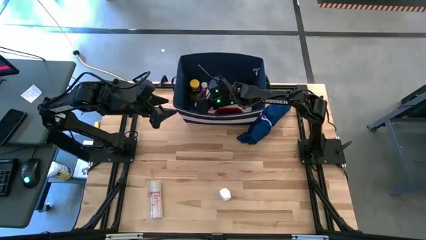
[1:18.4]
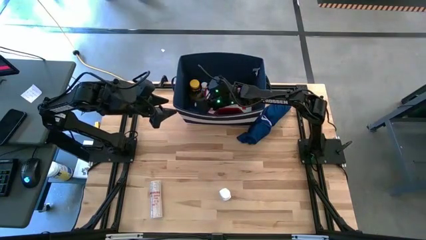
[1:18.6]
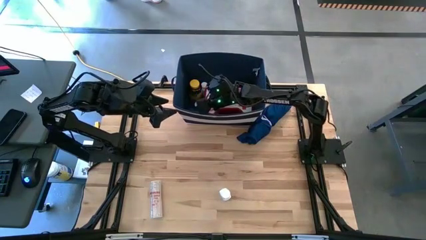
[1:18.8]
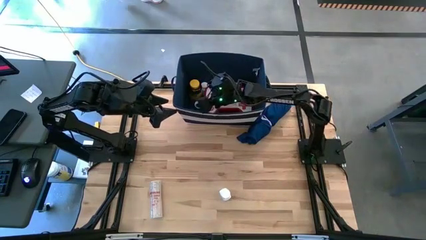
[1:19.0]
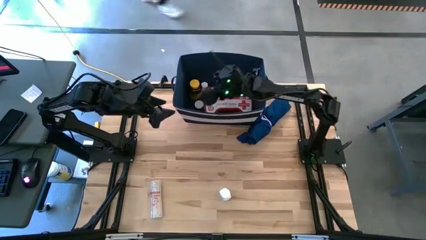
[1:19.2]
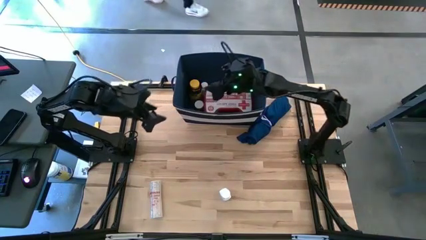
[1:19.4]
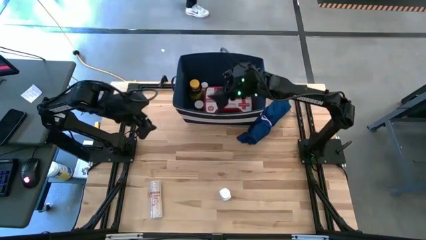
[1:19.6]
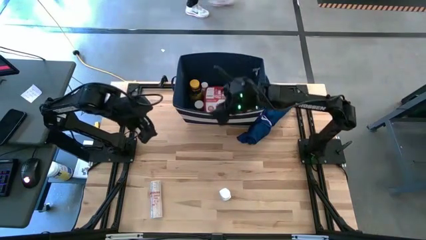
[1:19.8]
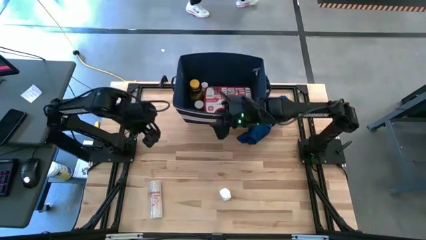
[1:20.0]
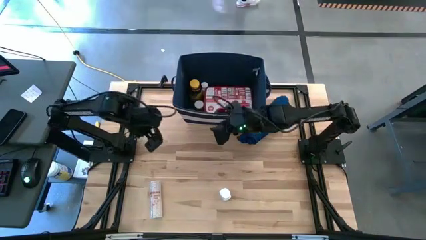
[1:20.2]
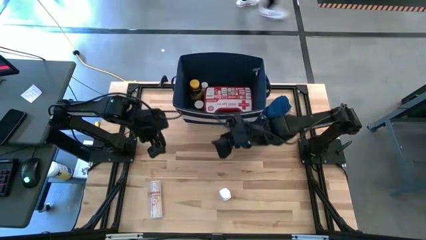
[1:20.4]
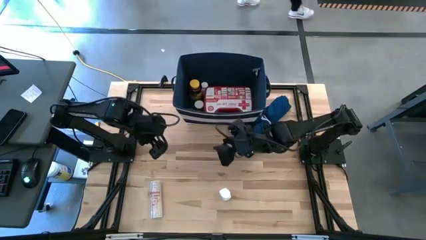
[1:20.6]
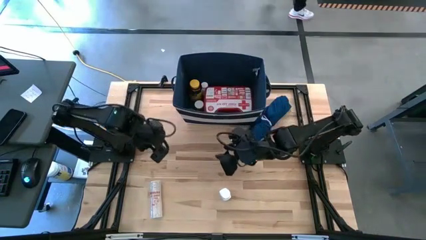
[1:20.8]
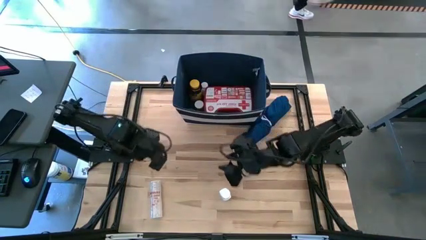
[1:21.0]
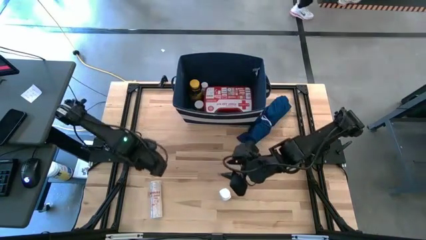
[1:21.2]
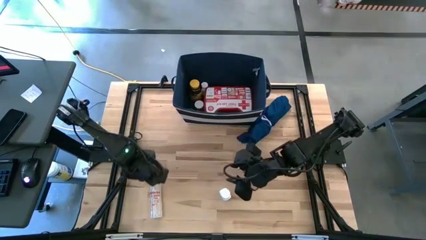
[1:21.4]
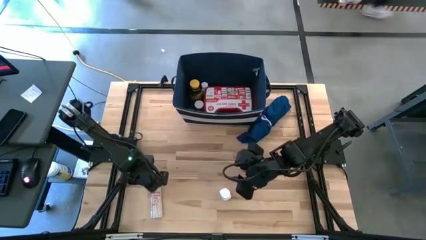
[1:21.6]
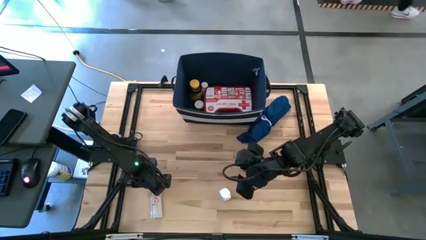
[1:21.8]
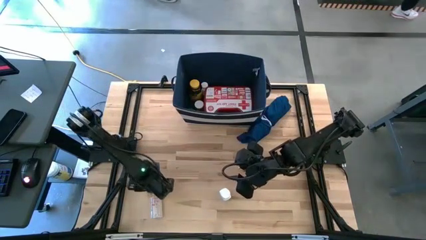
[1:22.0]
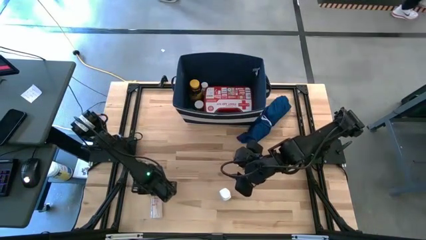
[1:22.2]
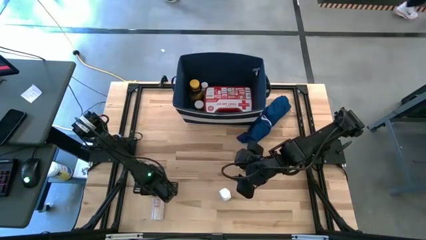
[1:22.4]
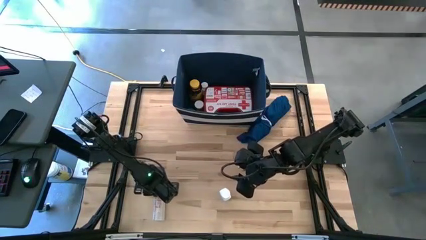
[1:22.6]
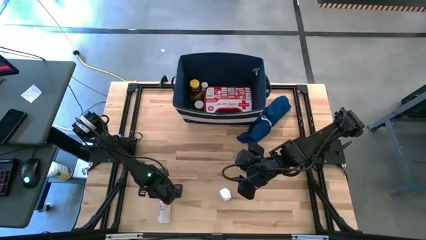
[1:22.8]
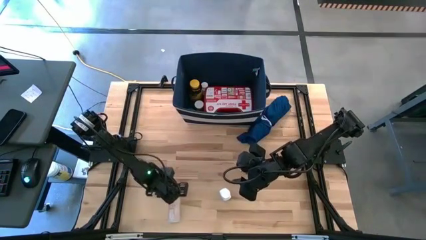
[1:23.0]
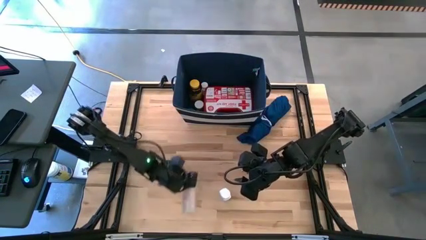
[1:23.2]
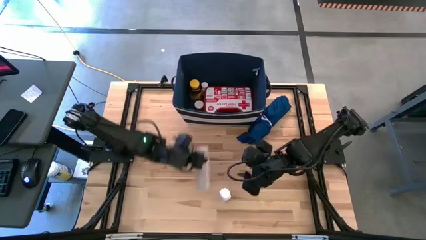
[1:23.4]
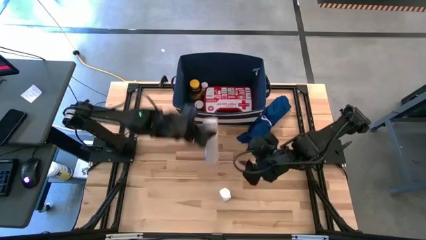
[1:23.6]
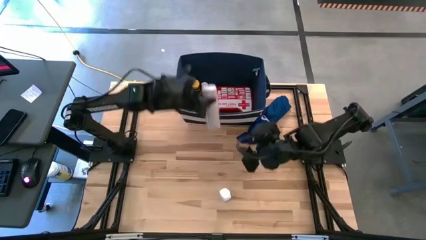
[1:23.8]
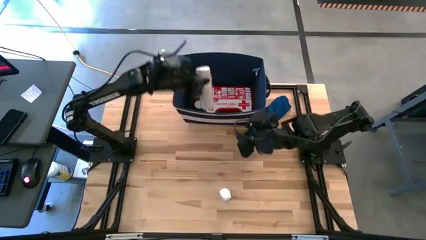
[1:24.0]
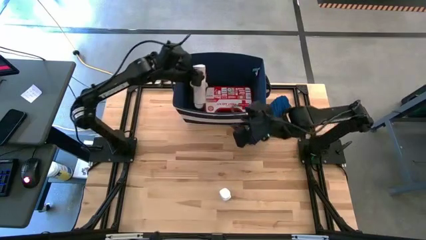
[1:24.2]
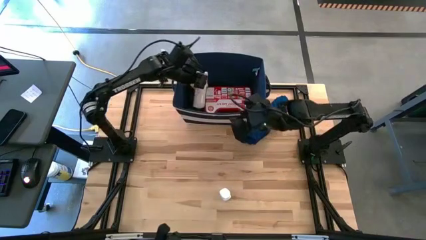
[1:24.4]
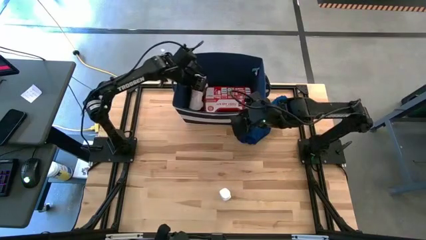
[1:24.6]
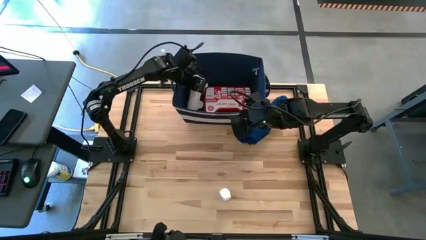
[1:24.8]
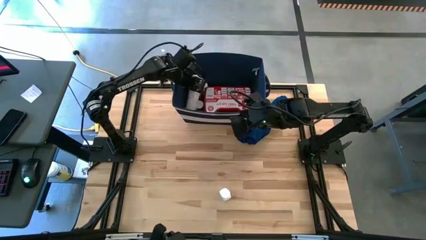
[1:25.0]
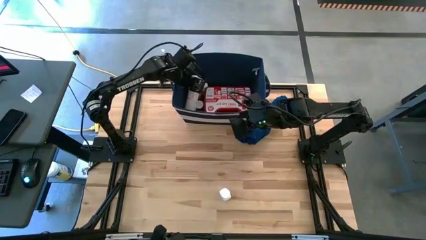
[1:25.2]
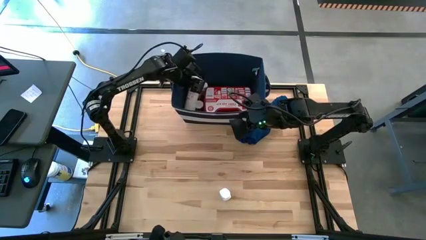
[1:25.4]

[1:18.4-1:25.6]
Task: Pick & place medical supplies in basket/bin
Put the rolled white bandage into the blue bin

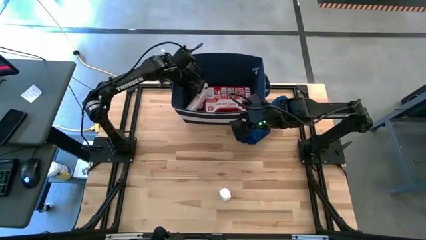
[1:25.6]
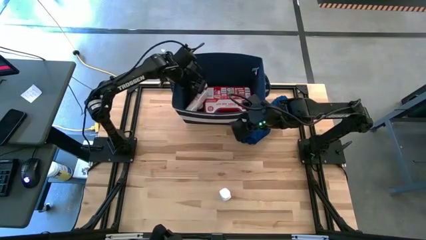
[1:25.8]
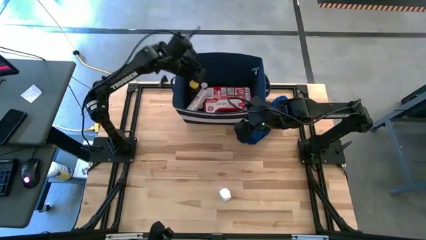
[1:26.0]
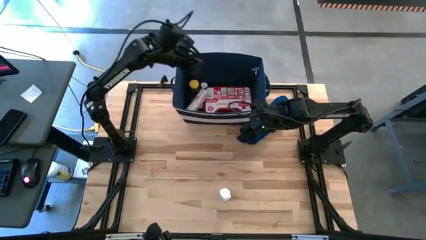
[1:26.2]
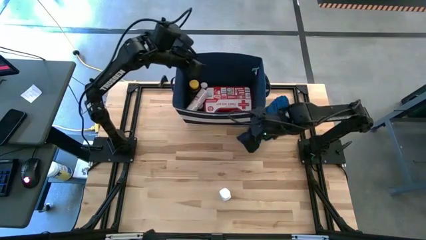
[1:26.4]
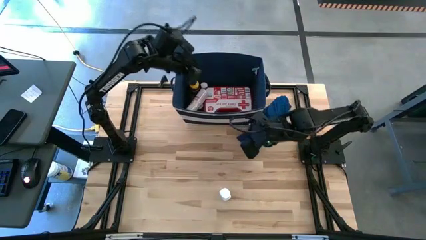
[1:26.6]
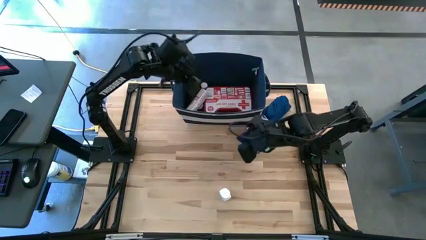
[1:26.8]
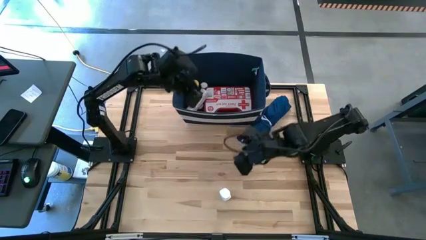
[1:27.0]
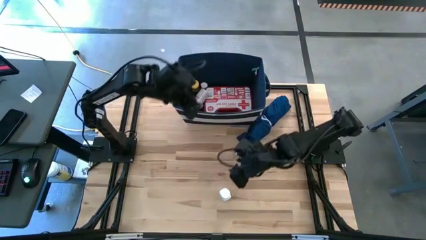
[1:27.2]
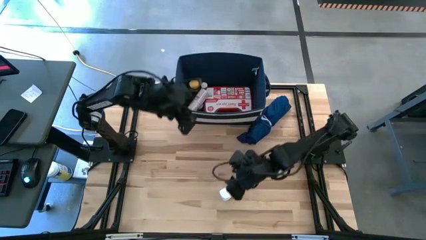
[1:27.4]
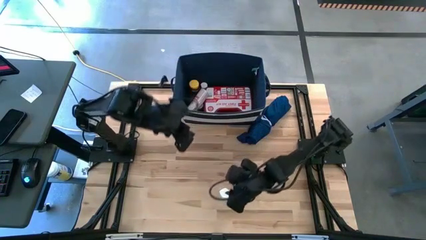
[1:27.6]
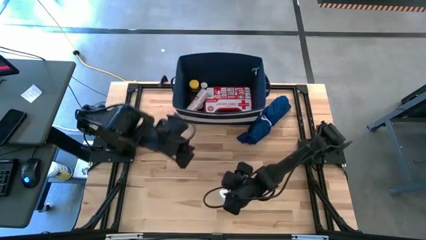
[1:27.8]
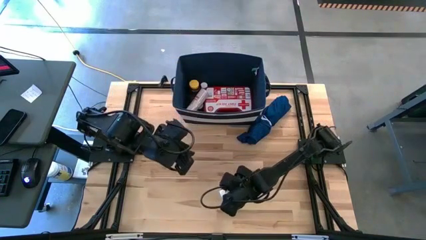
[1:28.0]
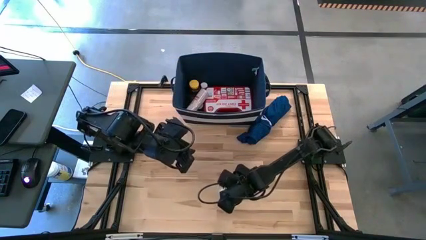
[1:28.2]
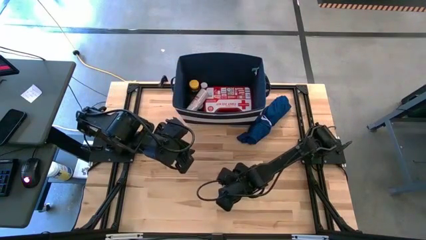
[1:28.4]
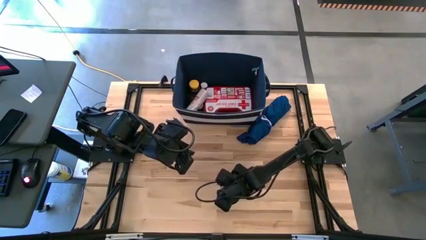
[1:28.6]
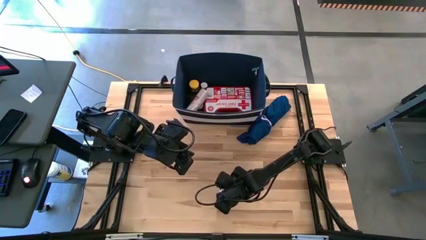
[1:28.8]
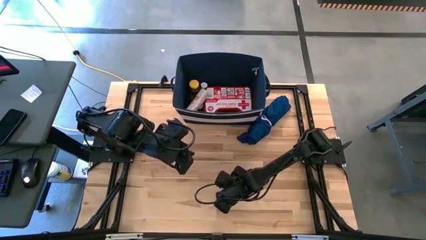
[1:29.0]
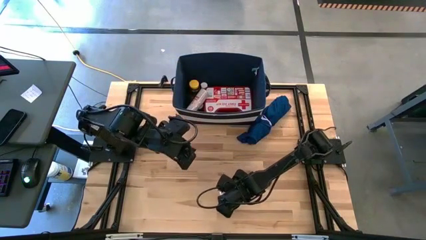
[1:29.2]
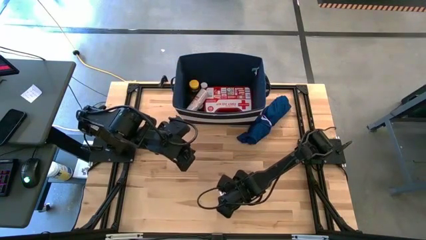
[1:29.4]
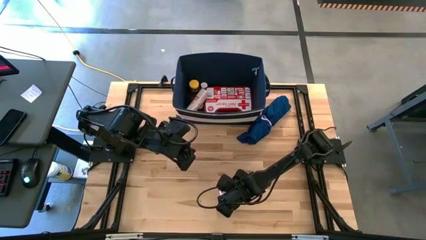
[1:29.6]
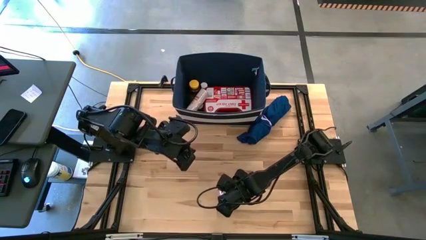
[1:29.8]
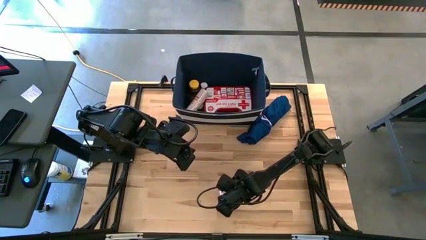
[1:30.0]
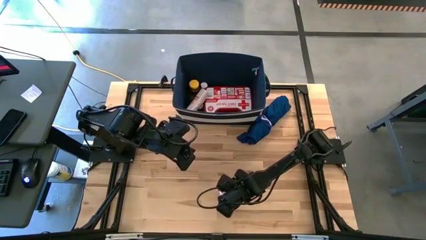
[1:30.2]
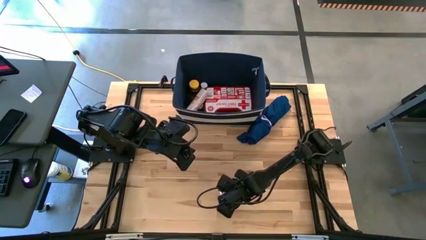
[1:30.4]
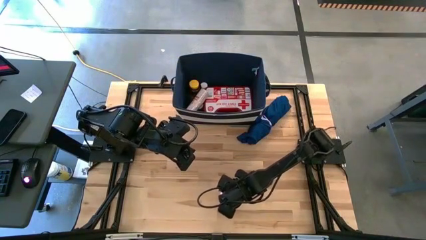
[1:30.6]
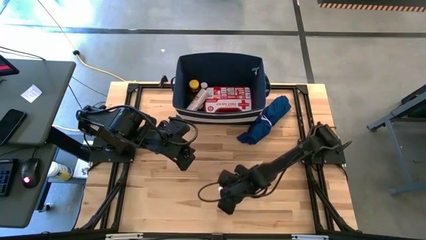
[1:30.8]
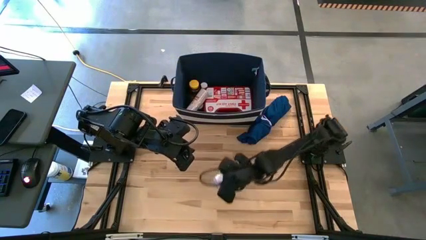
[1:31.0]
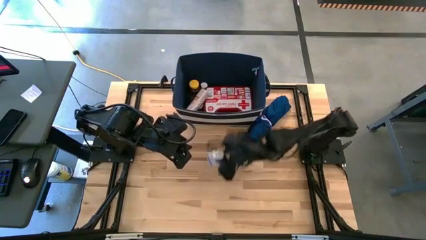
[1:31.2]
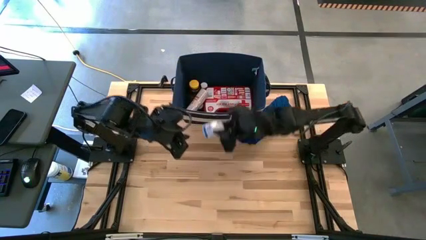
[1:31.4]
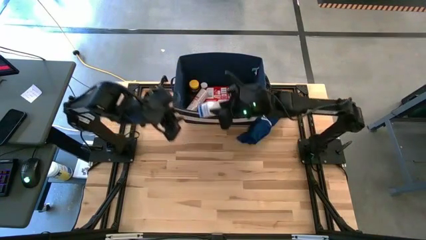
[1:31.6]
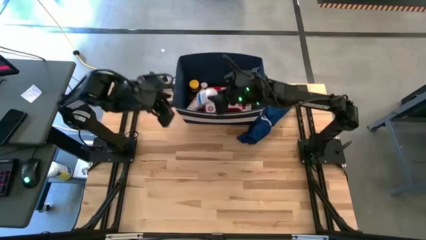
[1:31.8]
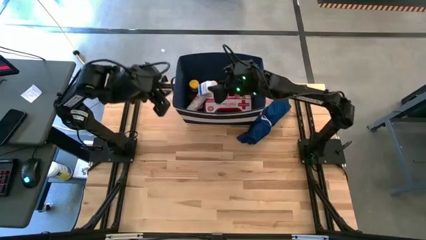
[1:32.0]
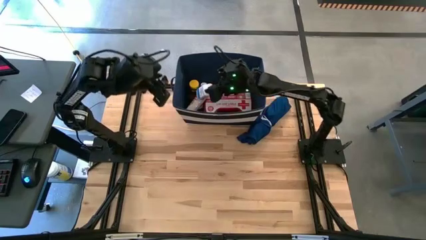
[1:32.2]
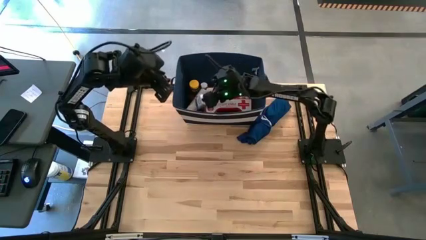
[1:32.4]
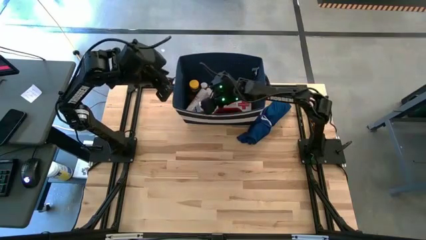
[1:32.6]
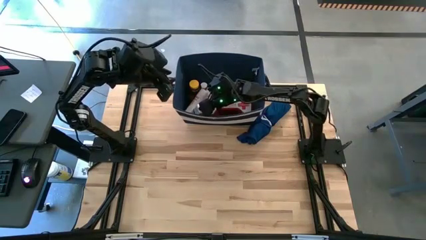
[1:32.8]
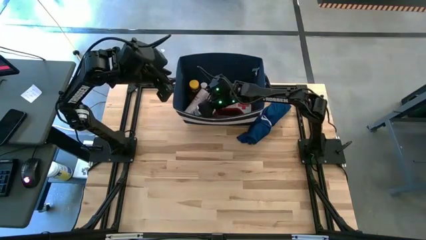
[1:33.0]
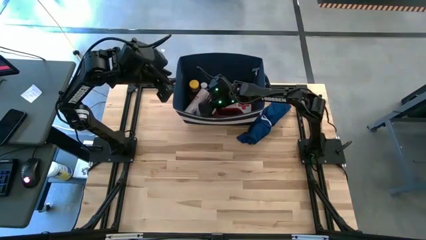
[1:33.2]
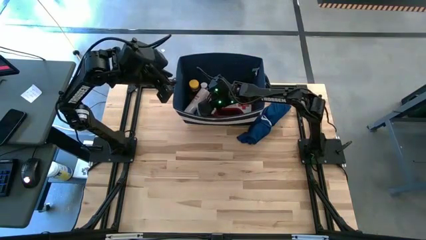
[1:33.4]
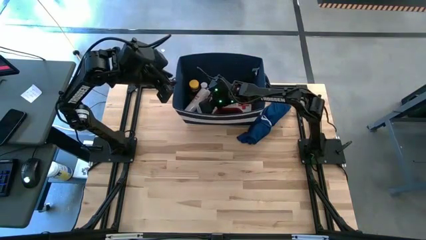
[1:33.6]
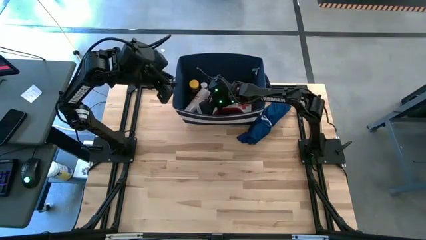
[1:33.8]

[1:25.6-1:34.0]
Put the white pill bottle into the blue bin

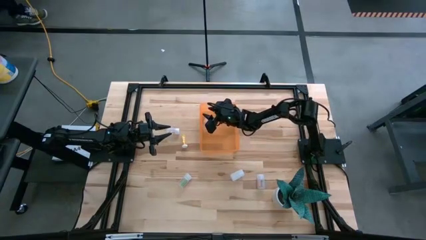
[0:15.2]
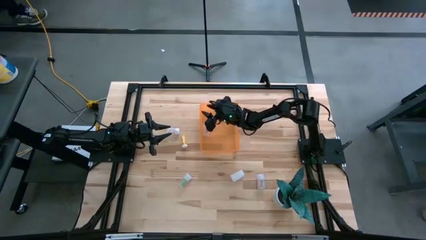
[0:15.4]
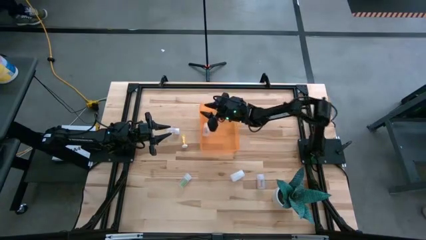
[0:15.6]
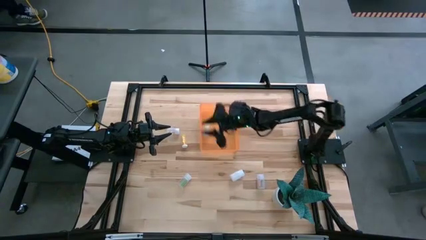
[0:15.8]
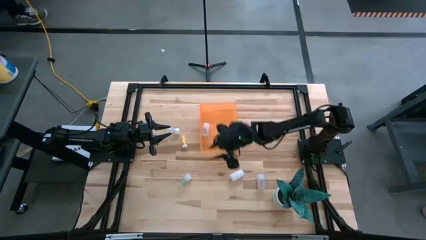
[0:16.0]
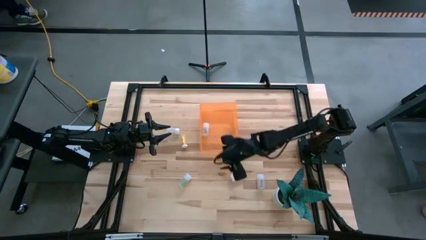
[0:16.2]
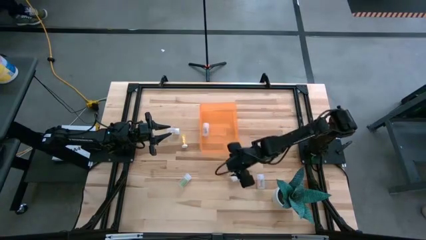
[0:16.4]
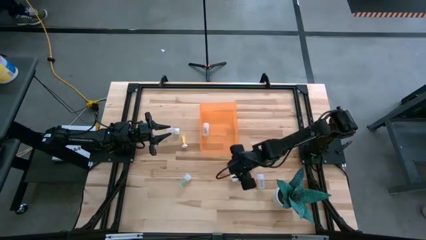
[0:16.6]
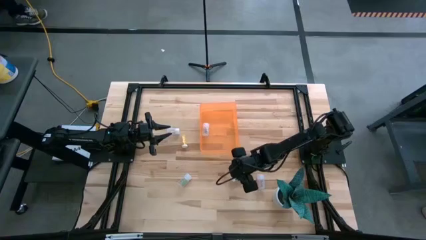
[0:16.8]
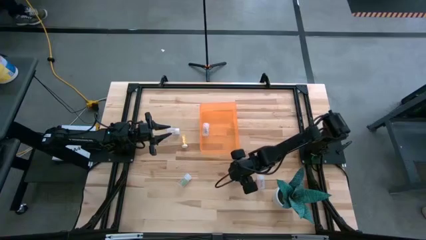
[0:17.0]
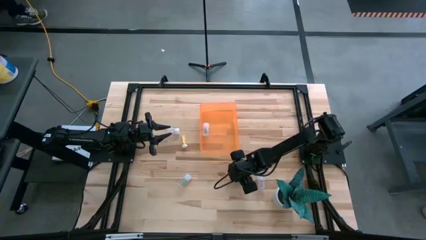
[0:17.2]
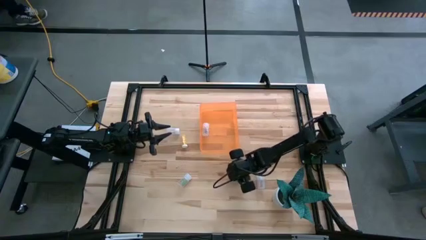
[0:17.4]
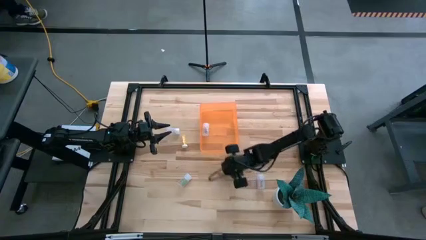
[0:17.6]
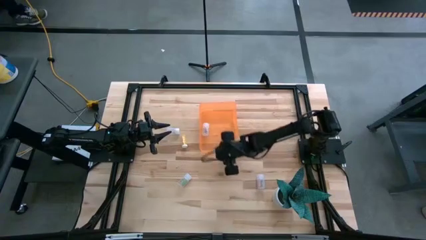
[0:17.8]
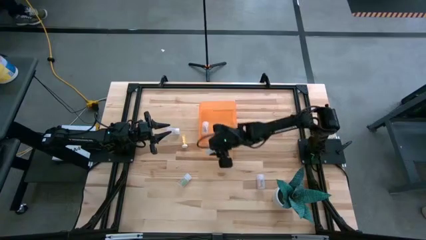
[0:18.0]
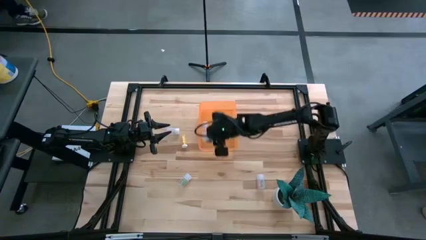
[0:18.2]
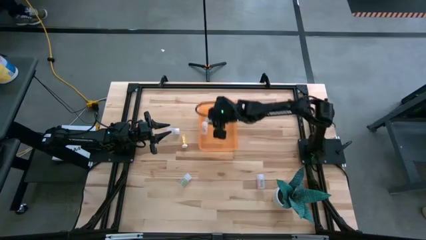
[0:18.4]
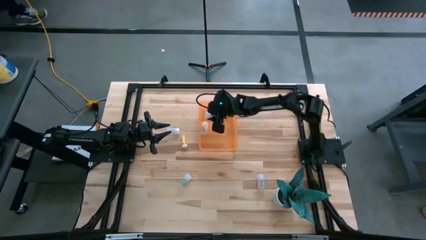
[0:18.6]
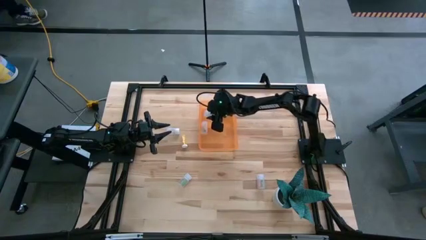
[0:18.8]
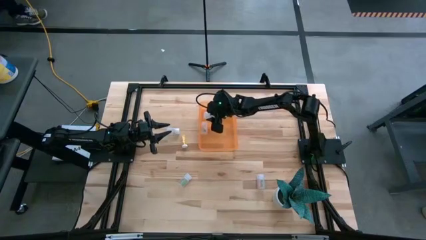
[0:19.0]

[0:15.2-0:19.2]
Task: Pick and place pill bottles into a basket
Put the white pill bottle into the orange bin
